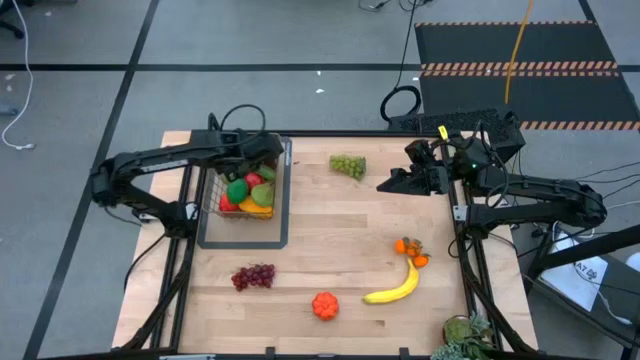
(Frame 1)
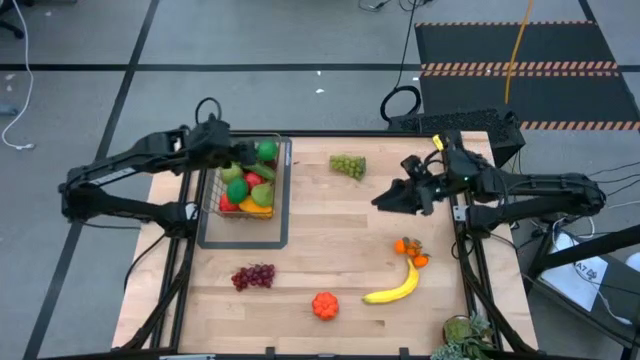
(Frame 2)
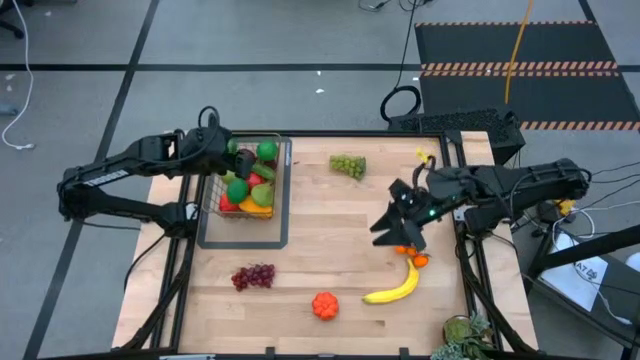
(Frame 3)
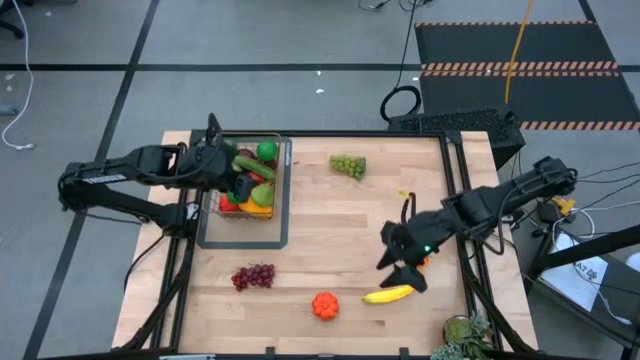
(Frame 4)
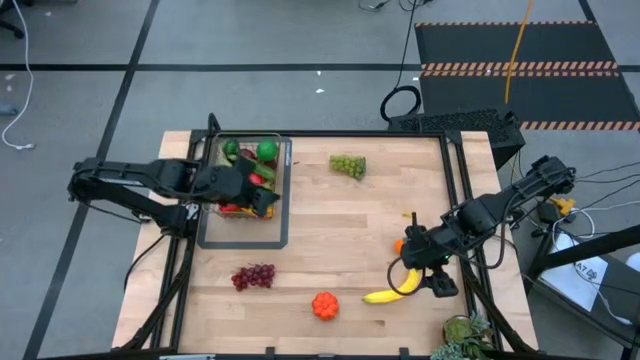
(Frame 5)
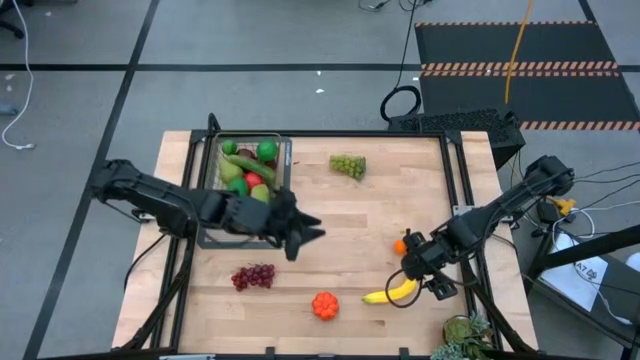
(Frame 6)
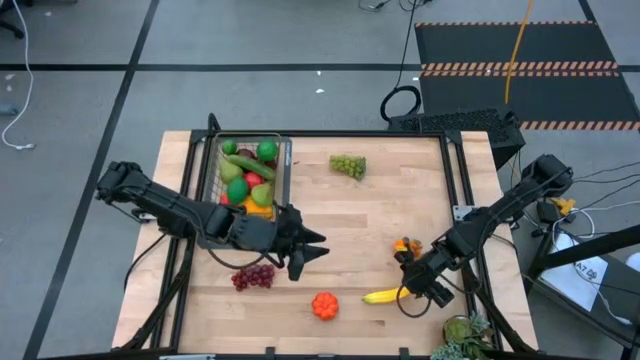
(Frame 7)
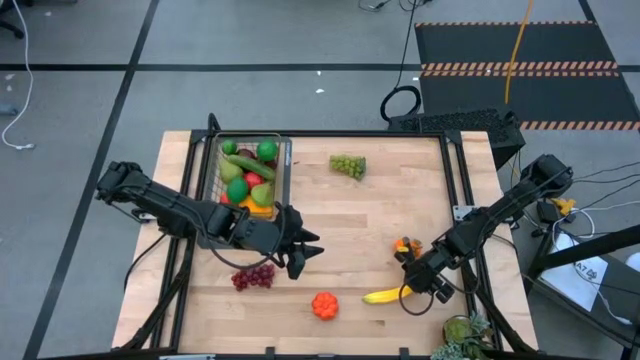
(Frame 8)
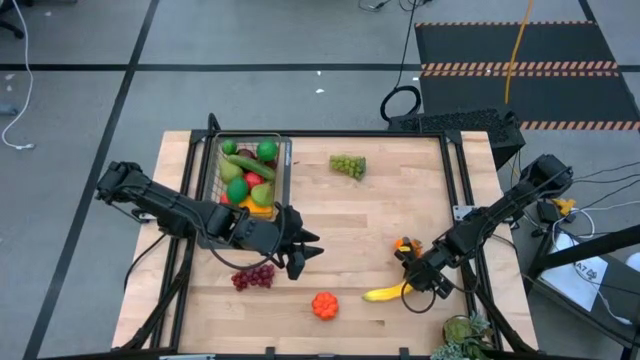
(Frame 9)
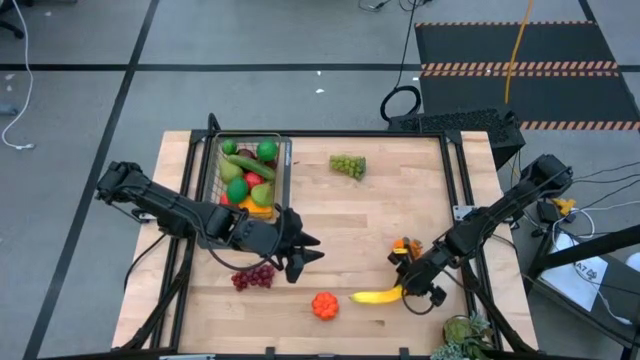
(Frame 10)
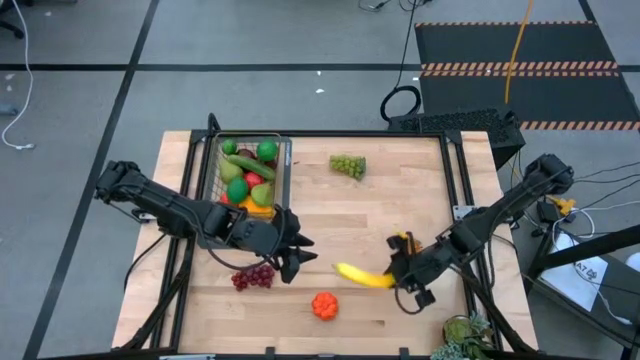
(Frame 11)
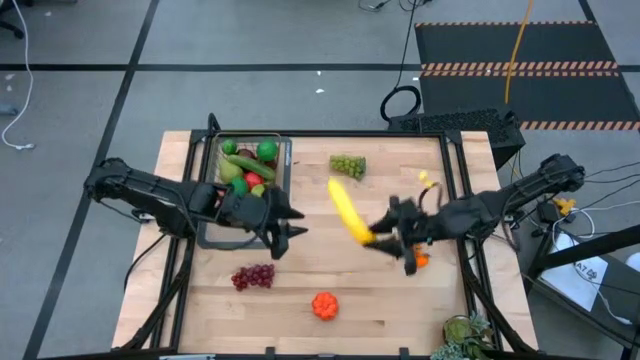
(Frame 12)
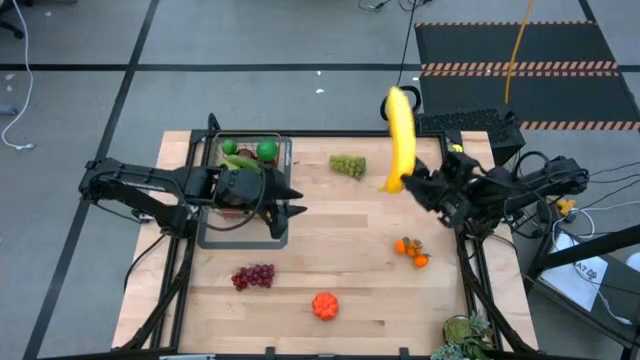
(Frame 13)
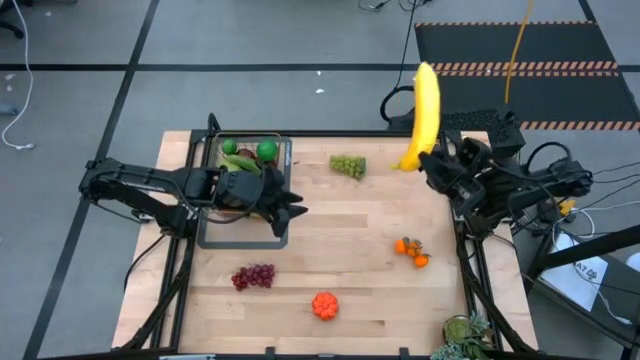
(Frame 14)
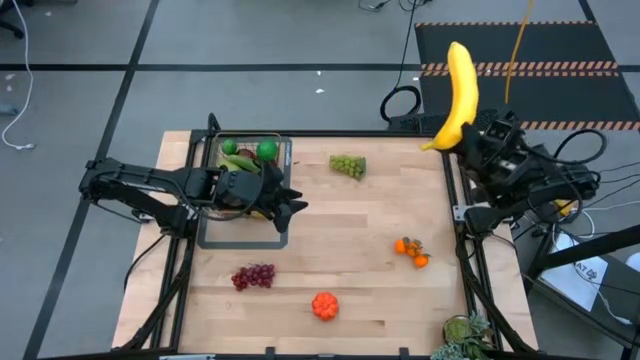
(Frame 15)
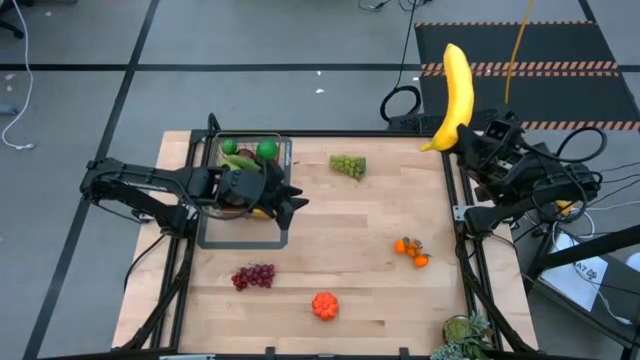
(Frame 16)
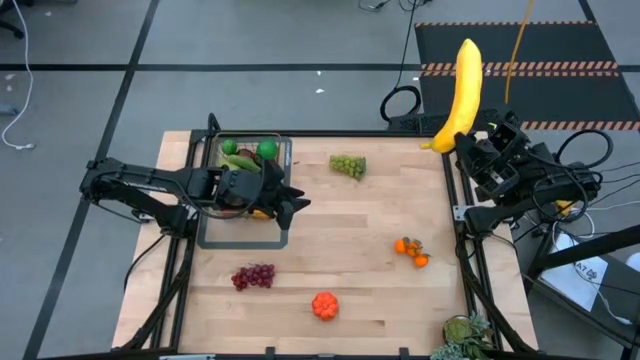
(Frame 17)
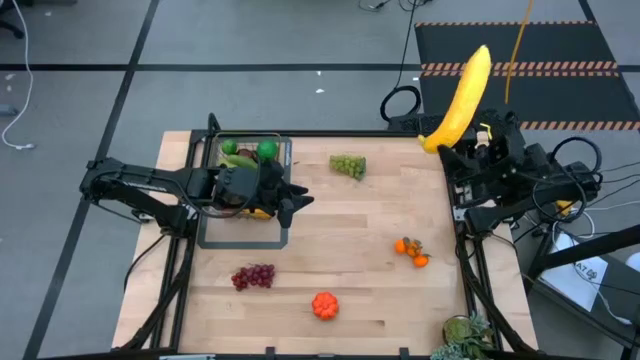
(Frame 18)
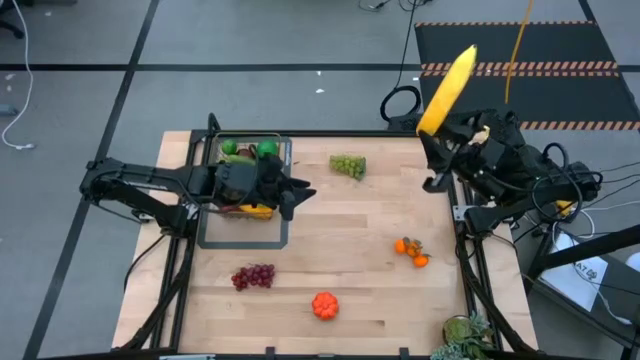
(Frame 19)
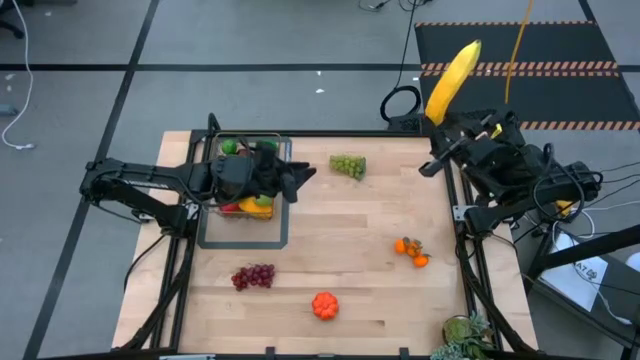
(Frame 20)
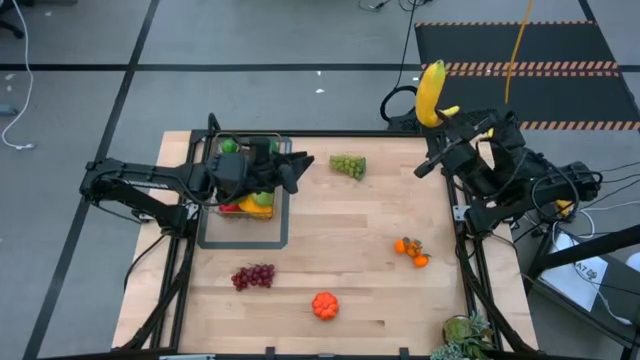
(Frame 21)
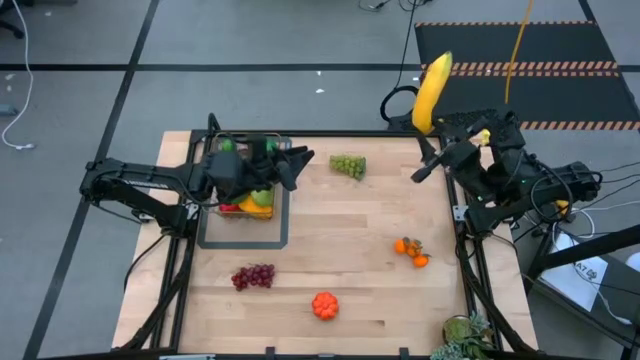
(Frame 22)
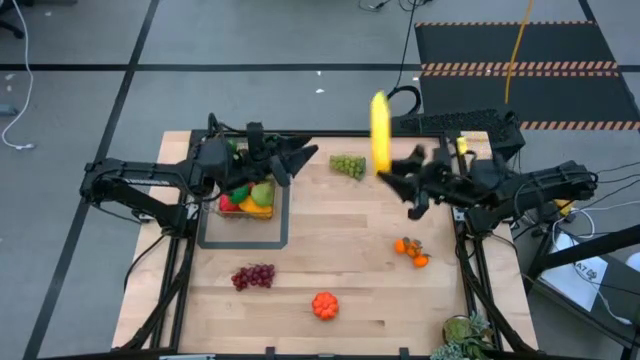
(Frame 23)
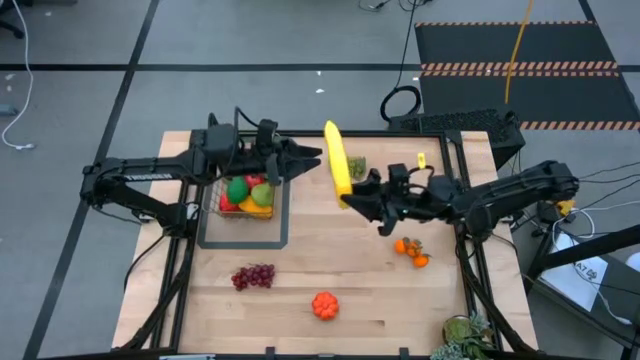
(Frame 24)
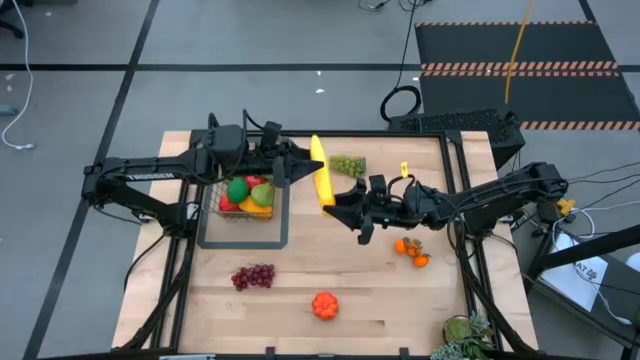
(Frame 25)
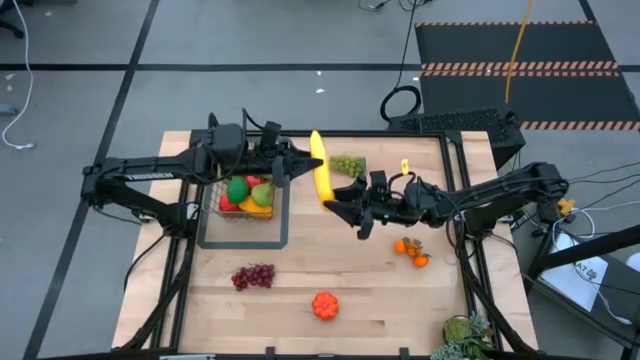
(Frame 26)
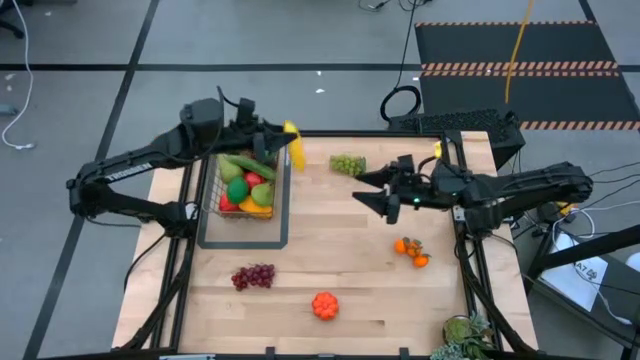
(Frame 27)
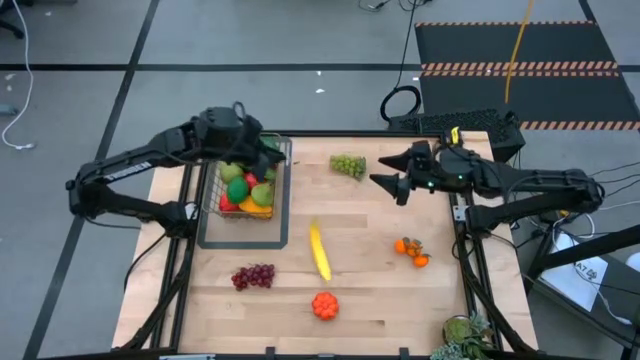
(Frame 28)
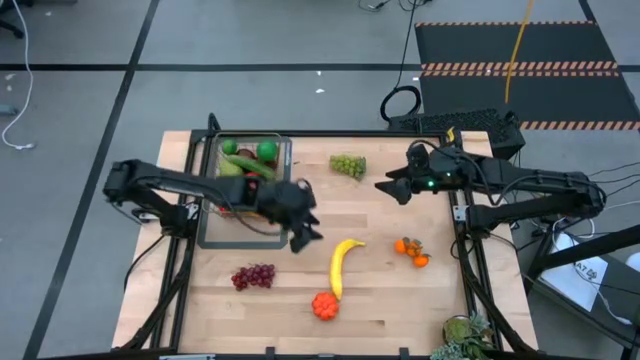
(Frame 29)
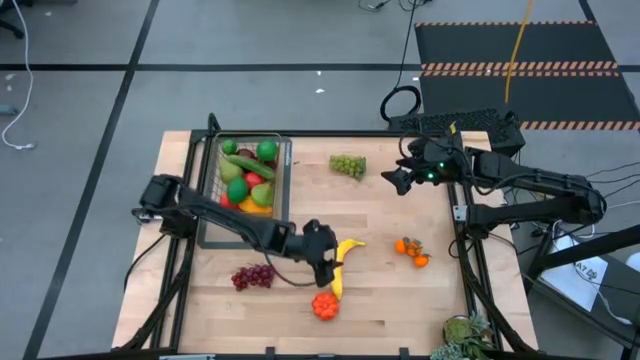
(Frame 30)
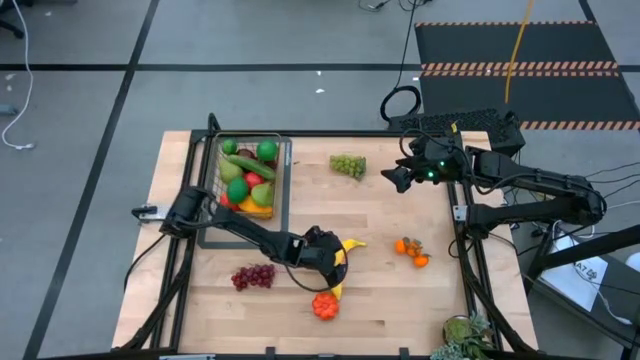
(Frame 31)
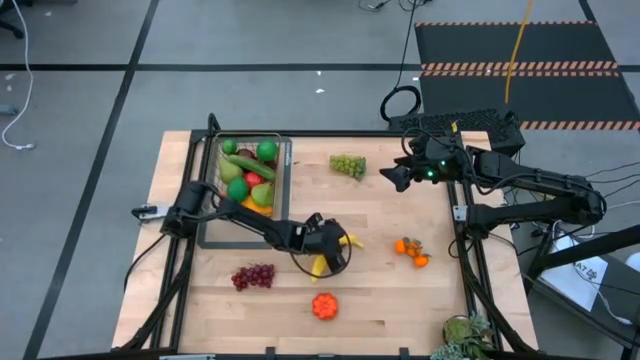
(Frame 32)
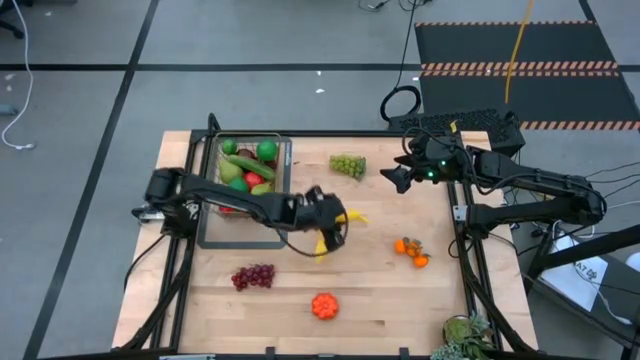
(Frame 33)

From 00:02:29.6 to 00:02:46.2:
Task: Build produce basket
Put the banana into the wire basket

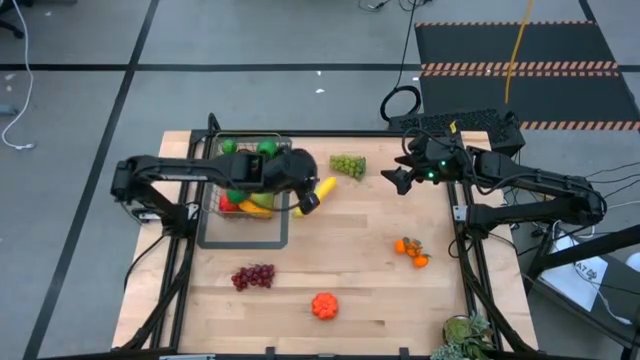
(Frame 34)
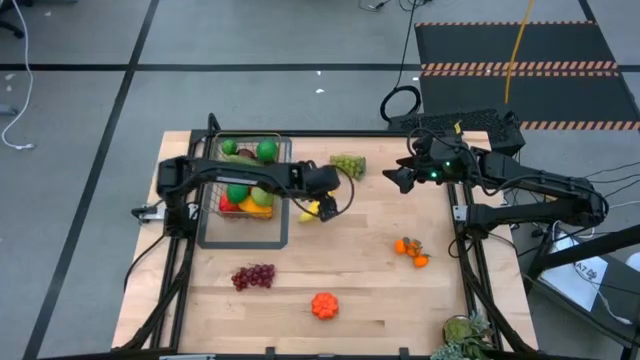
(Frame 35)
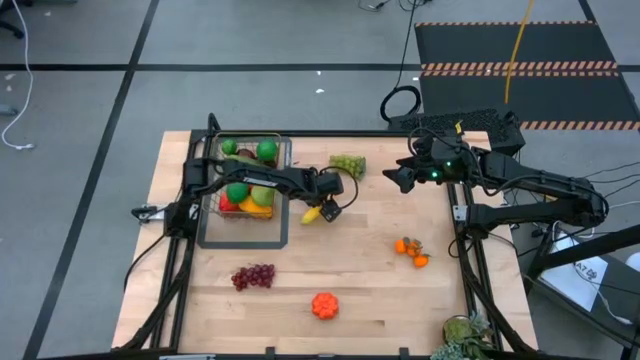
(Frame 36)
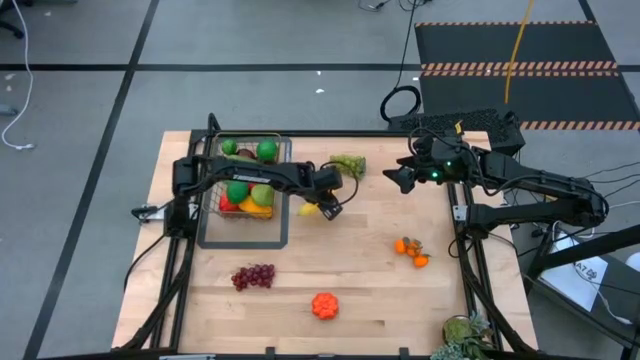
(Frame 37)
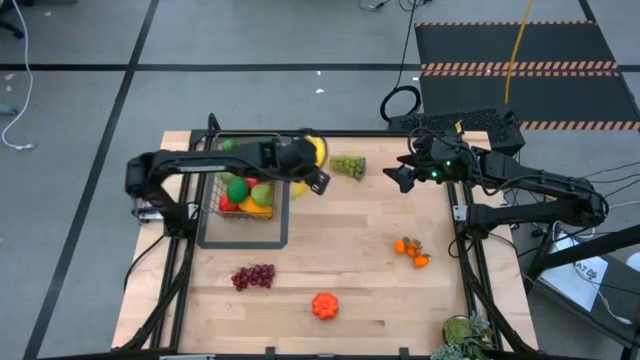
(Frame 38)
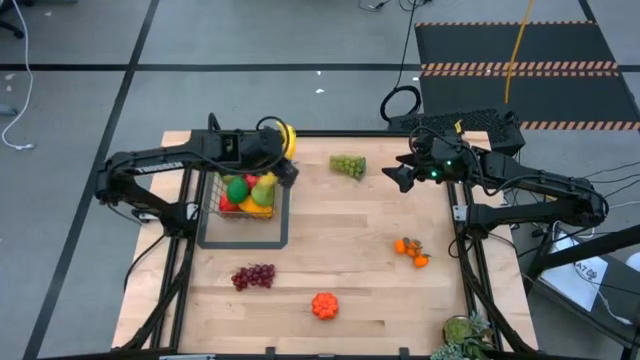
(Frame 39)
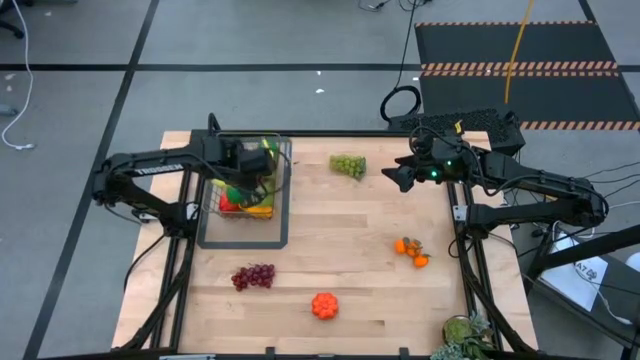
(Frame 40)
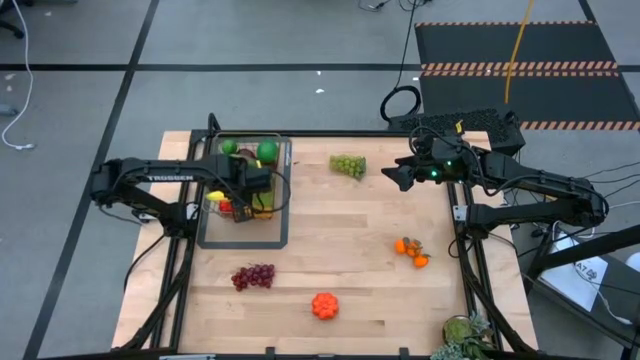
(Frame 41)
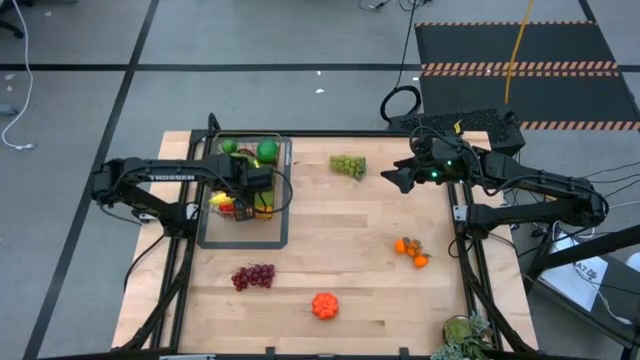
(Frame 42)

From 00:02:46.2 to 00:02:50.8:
Put the banana into the wire basket

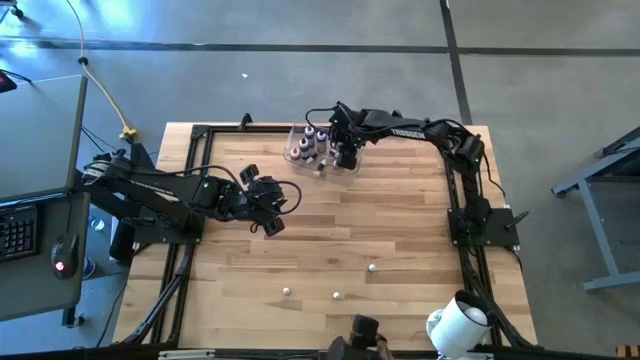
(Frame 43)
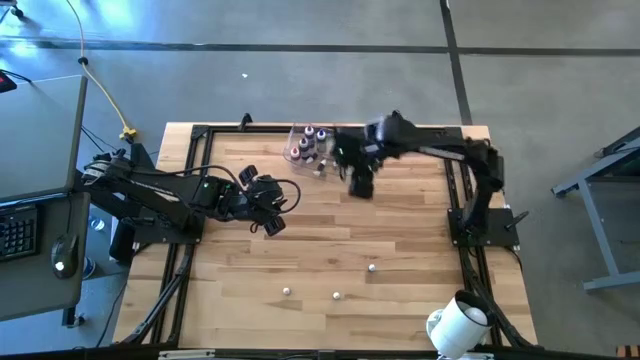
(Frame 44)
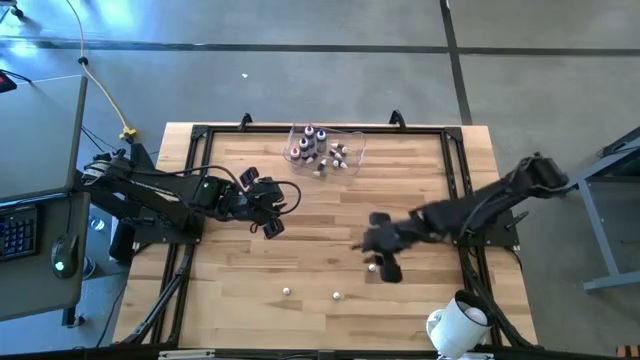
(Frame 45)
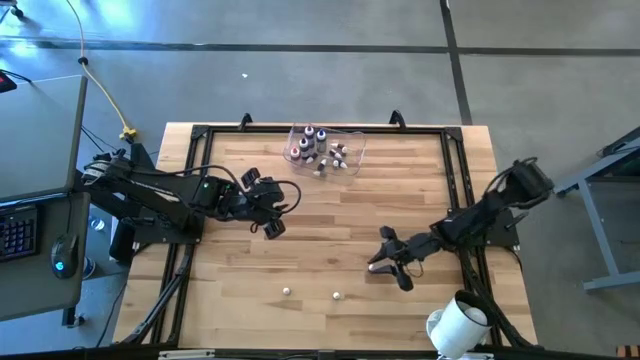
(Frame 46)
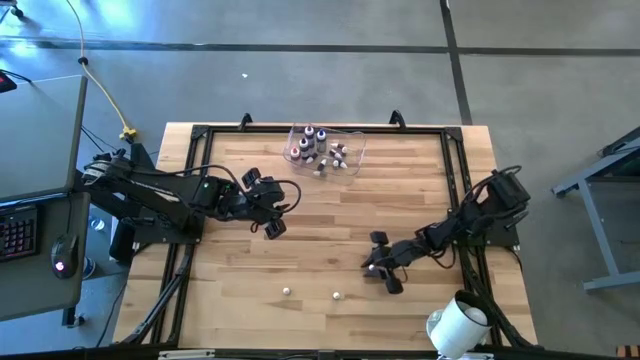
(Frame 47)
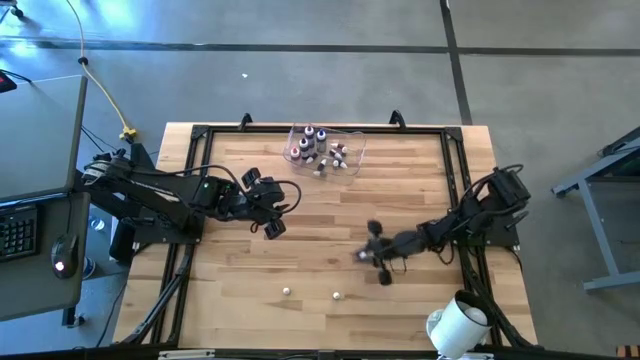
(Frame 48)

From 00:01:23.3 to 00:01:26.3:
Task: Pick & Place food coloring
Put the purple food coloring into the transparent bin
